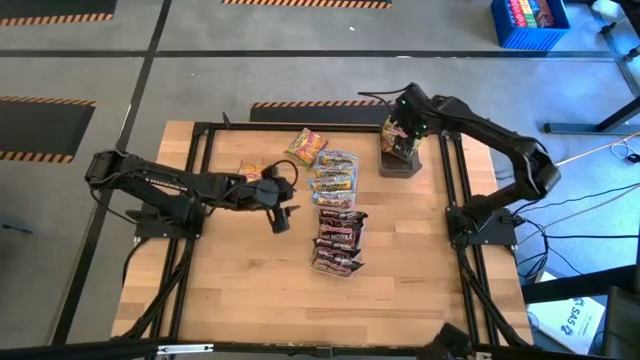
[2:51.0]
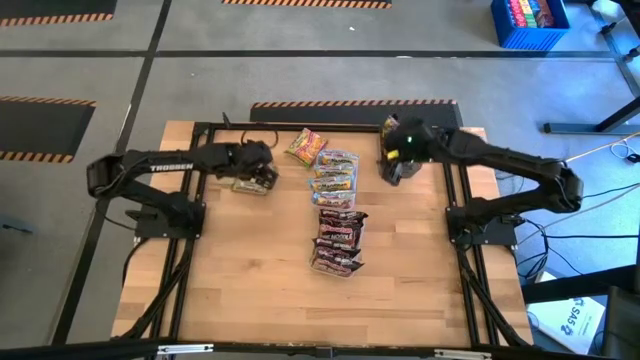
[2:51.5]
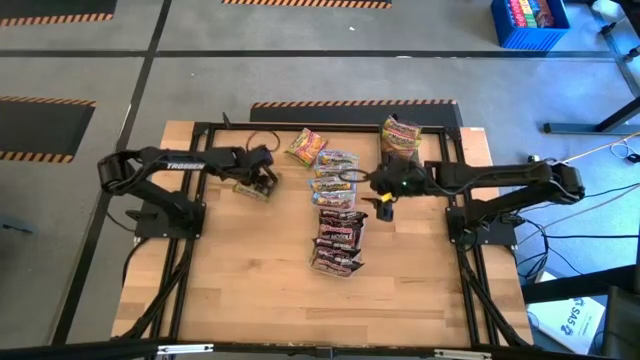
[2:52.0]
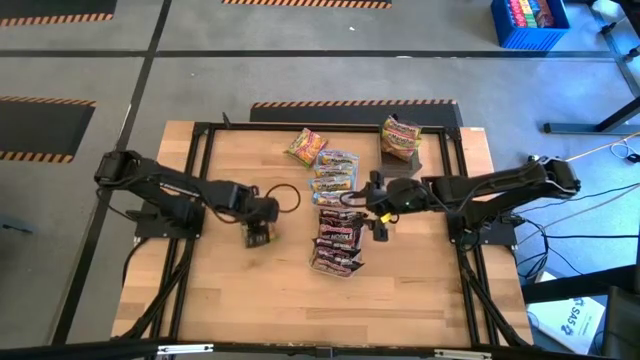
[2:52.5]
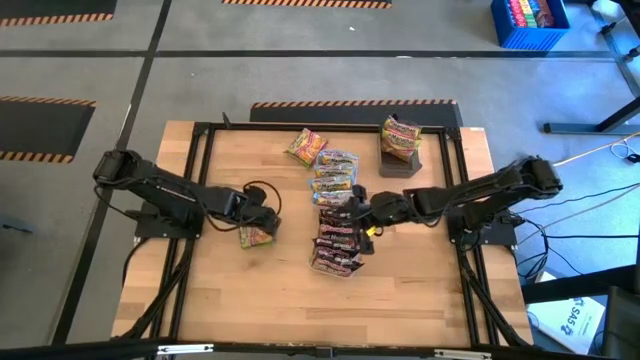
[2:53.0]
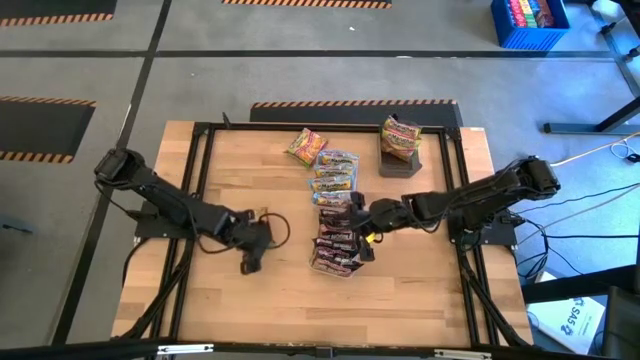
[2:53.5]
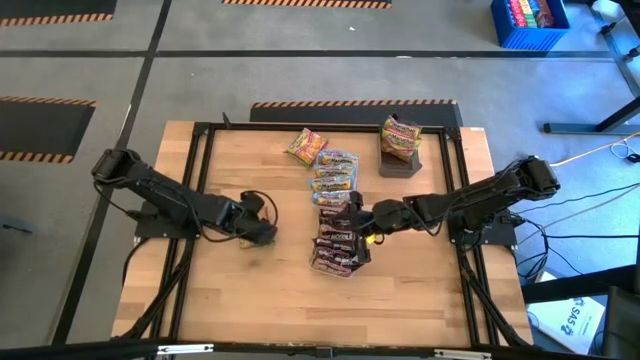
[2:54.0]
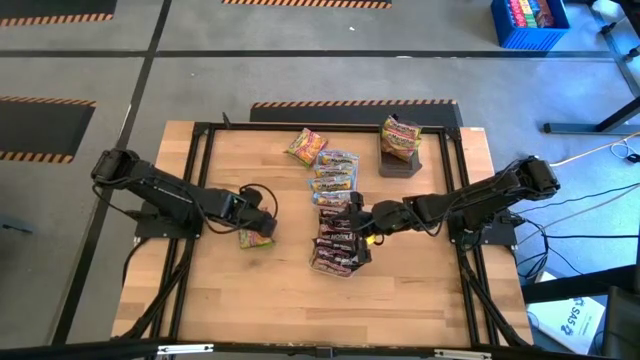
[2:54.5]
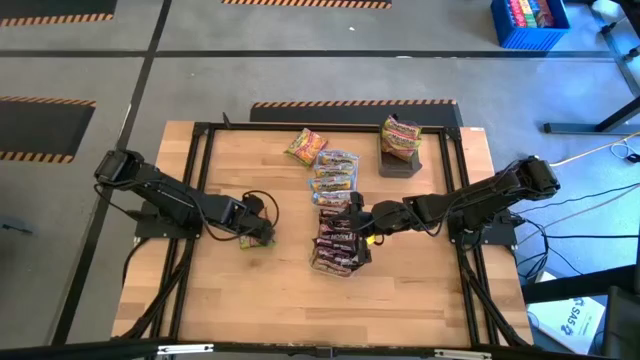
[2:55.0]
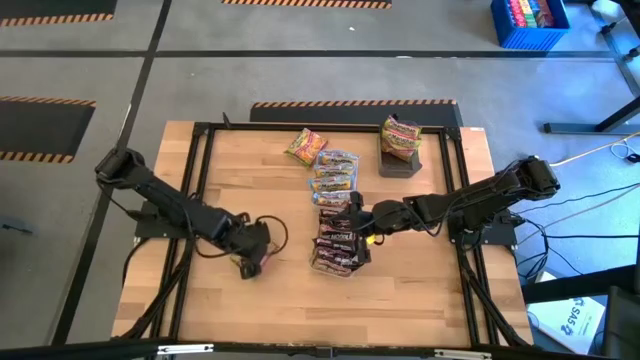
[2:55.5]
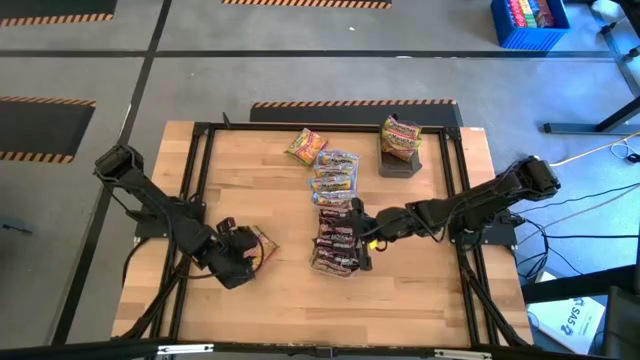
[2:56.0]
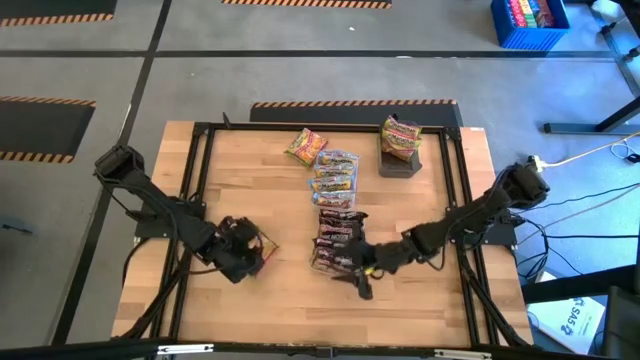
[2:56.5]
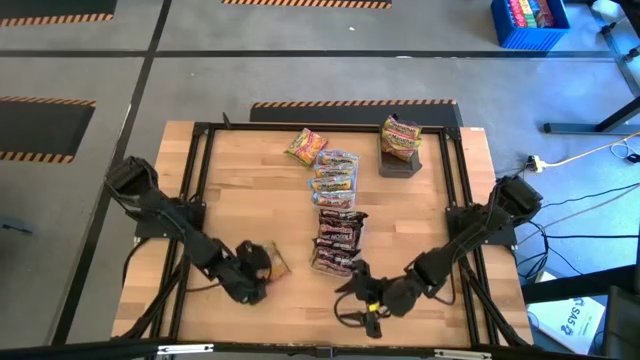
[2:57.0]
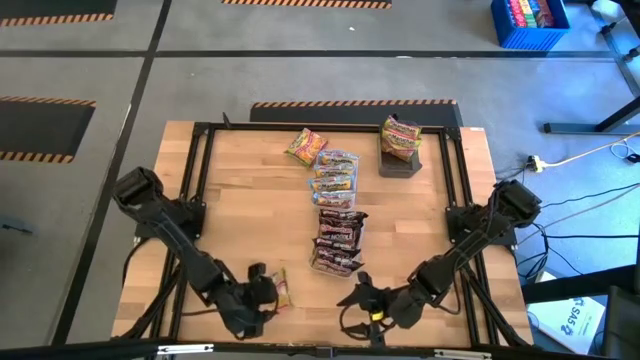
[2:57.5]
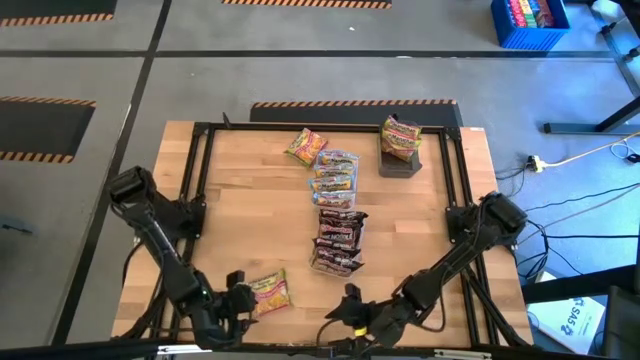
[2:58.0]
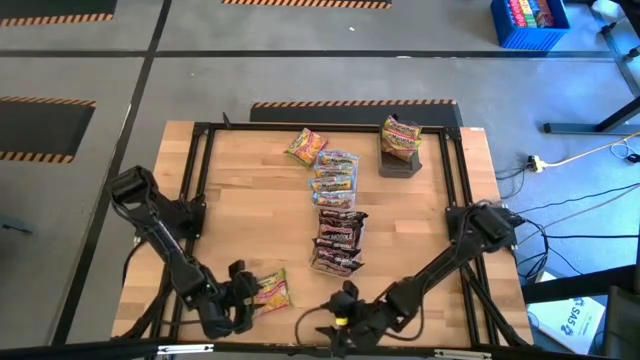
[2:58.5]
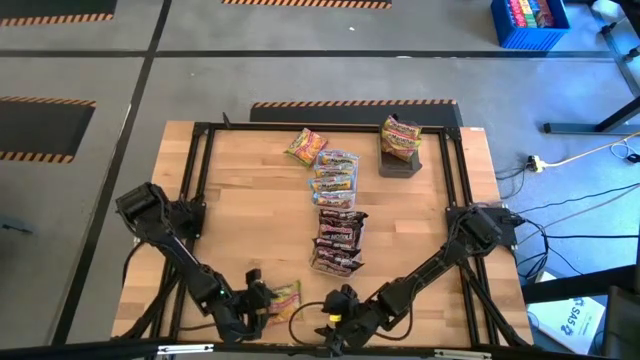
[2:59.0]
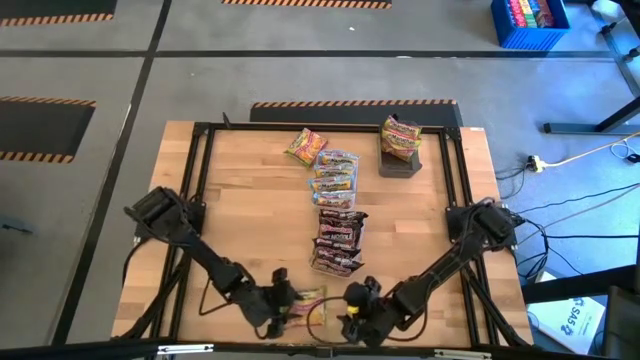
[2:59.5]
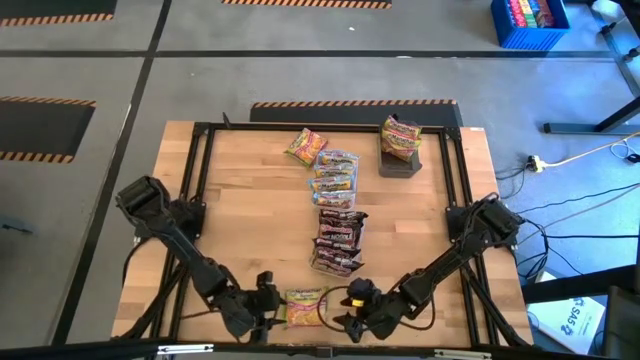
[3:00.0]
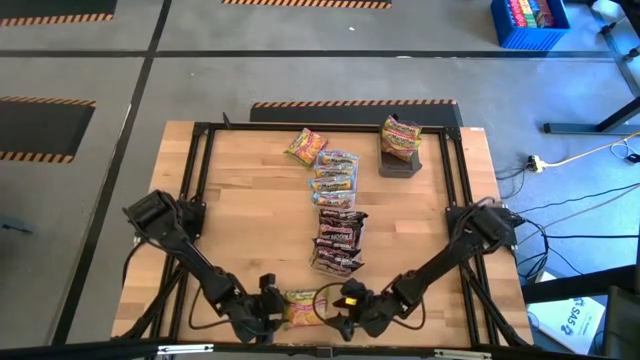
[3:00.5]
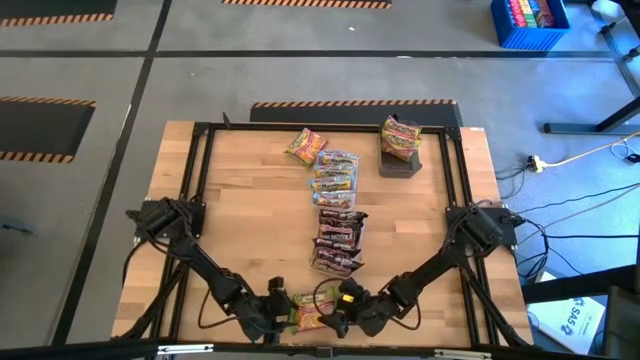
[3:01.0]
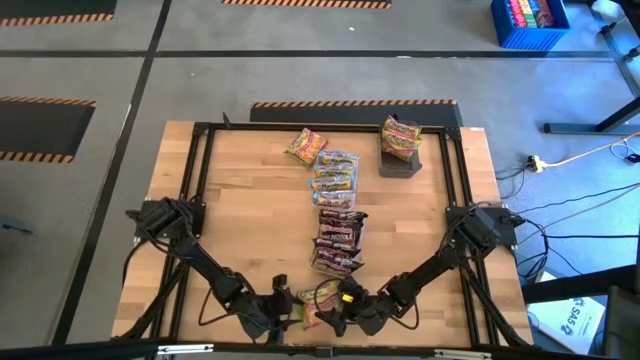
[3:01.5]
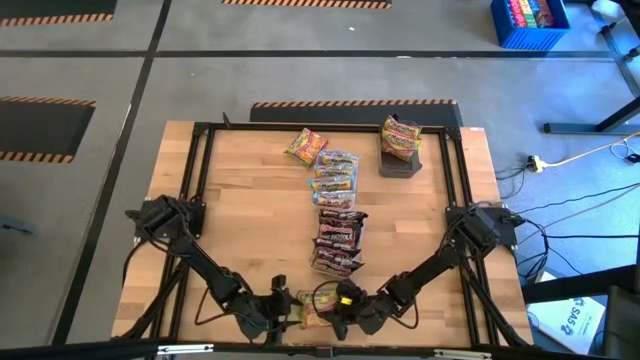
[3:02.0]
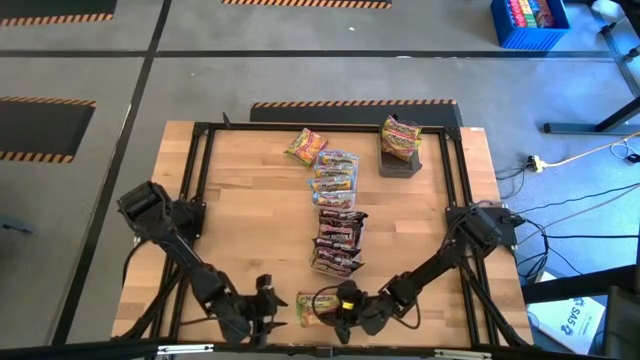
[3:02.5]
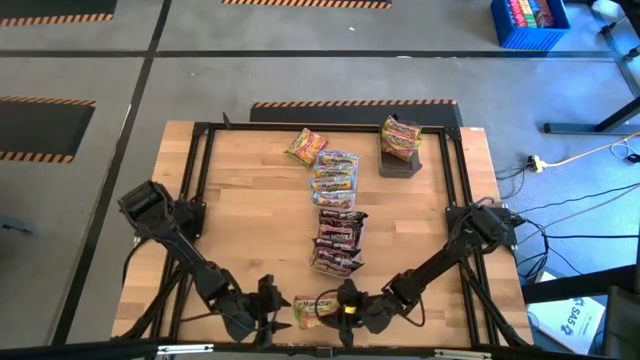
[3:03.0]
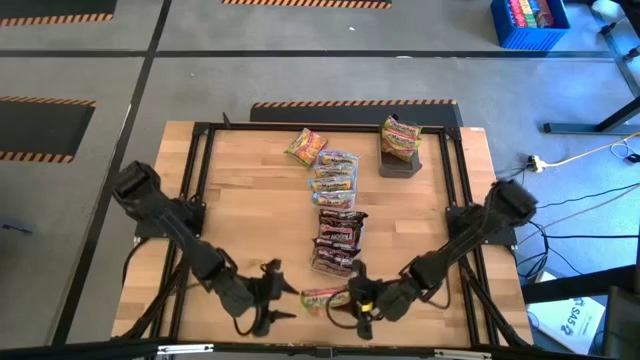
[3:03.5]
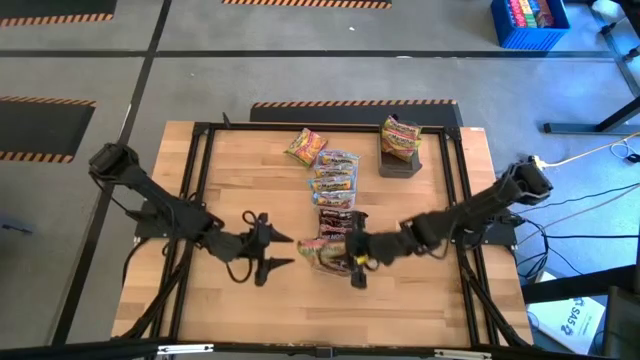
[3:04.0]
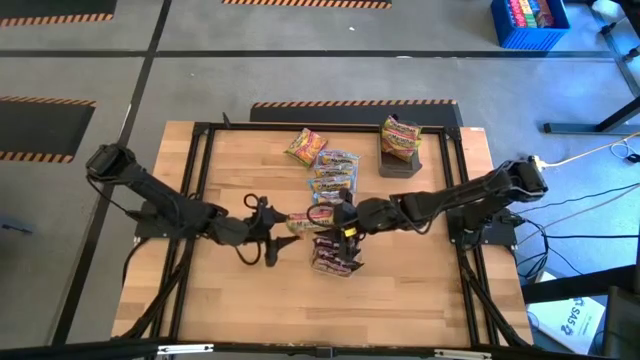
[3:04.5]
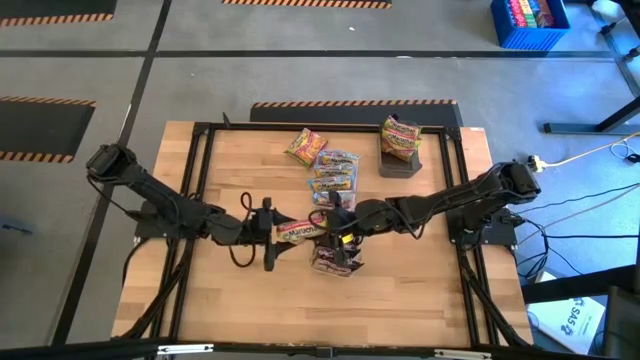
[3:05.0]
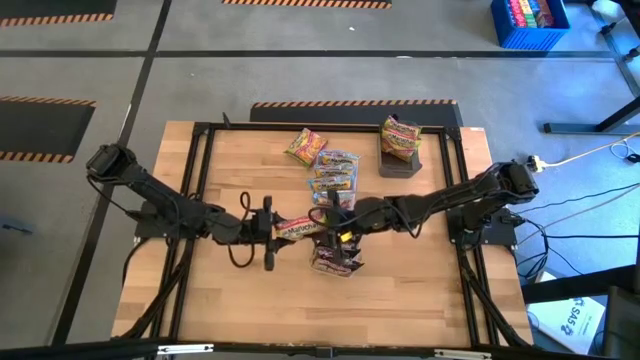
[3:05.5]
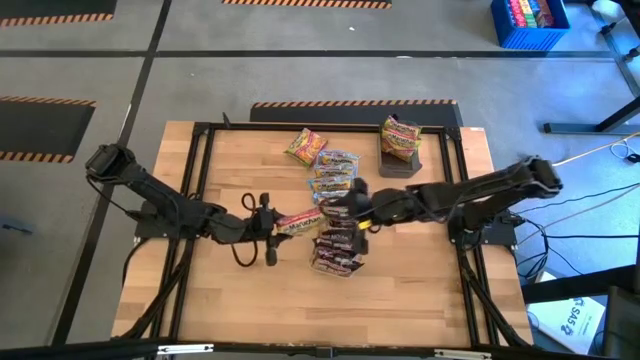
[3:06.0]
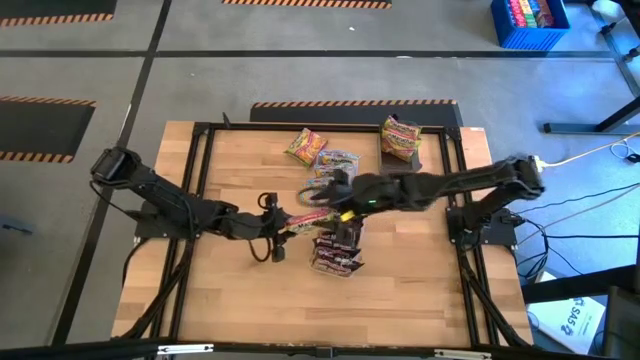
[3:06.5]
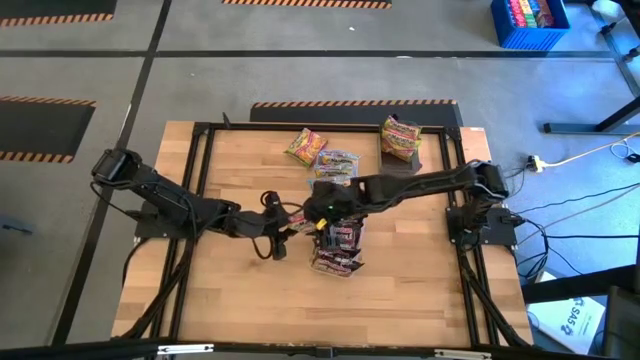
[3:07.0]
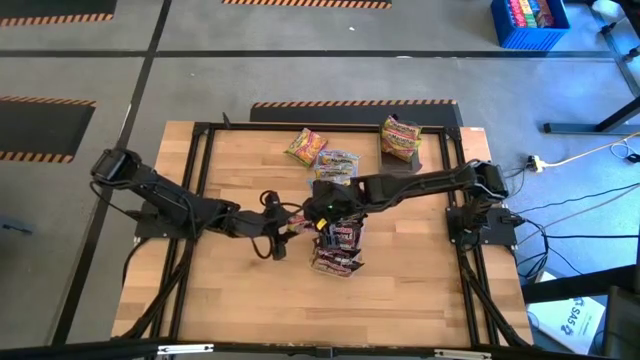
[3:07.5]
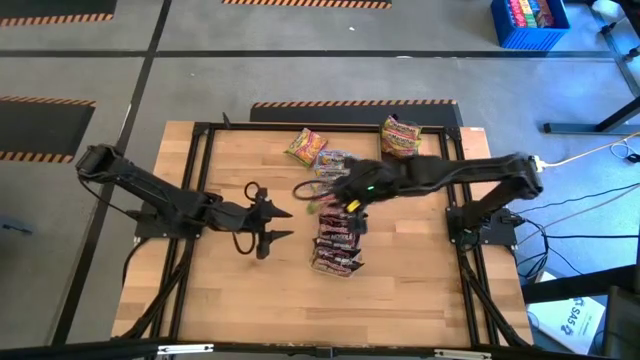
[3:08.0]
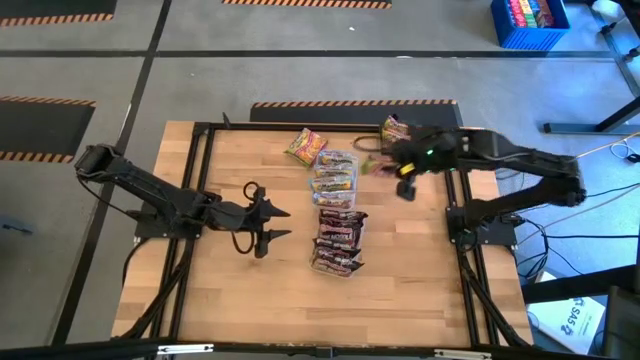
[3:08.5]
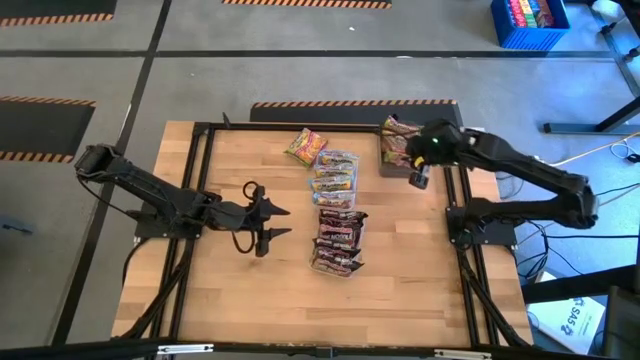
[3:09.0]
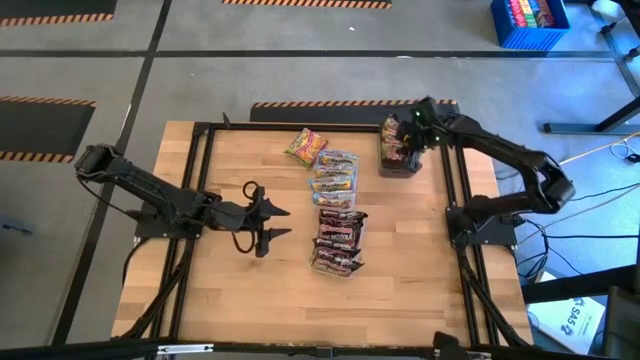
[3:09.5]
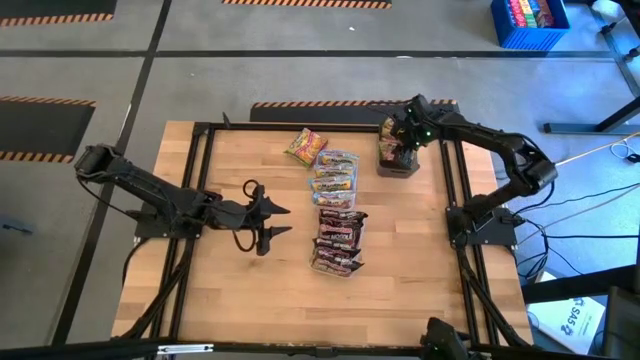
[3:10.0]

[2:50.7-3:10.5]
Task: Sort Maruchan noodles
Put the bottom green noodle pack into the black bin

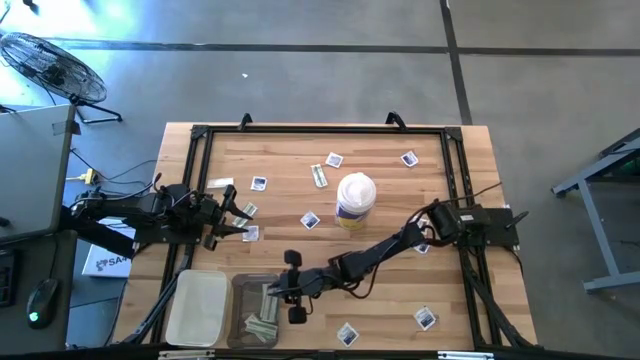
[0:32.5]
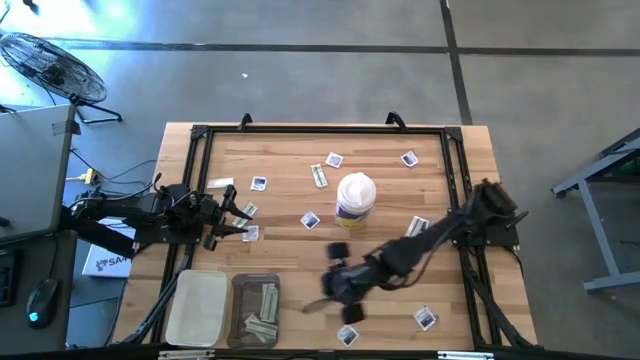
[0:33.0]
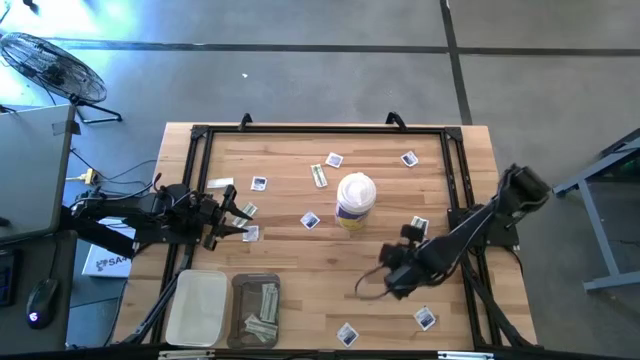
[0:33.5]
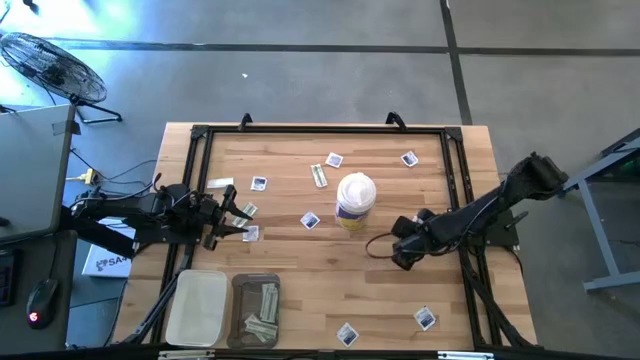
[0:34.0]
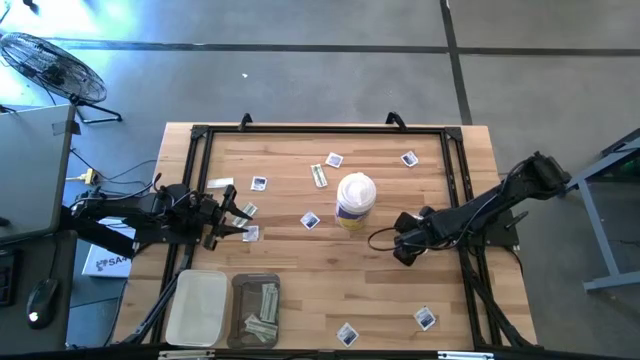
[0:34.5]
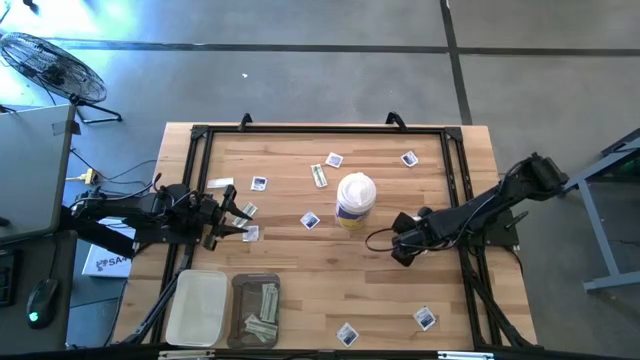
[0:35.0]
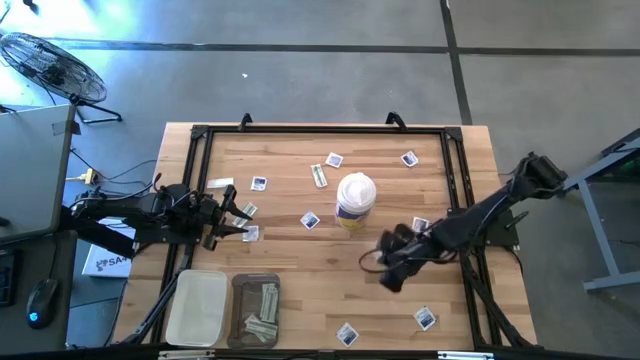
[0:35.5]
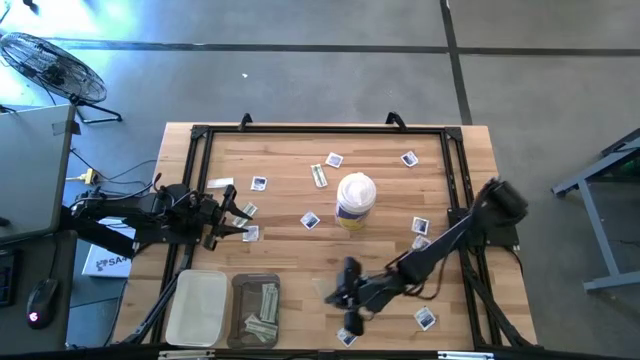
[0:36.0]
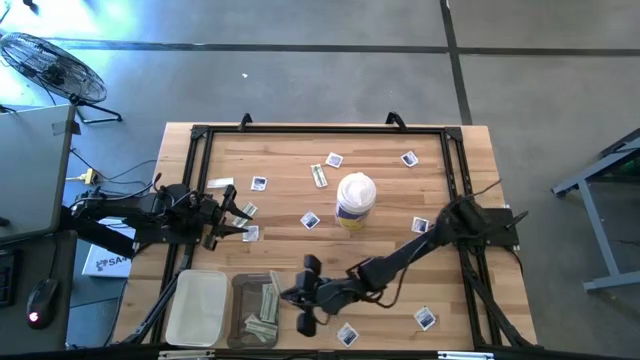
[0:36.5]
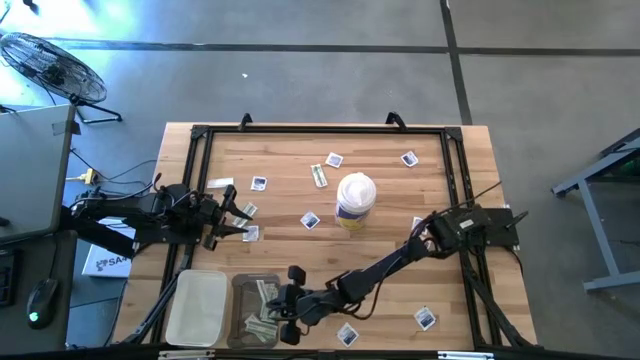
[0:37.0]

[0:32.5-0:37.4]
Task: Pick & Place First Aid Supplies
Put the bandage into the black transparent bin
